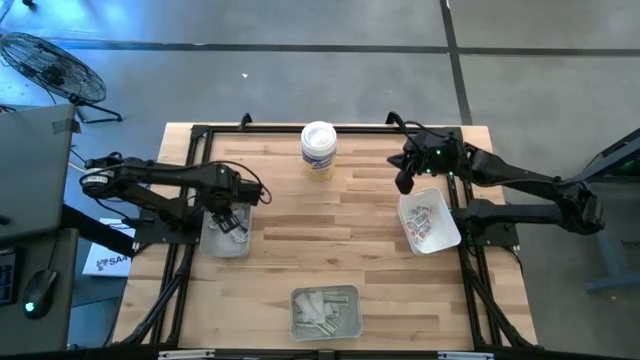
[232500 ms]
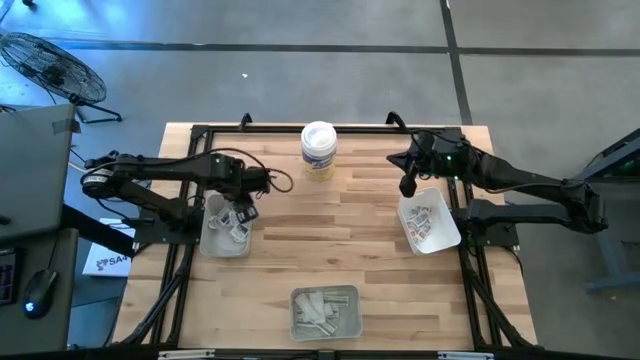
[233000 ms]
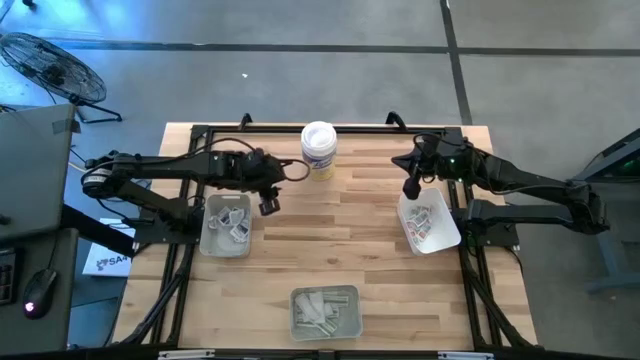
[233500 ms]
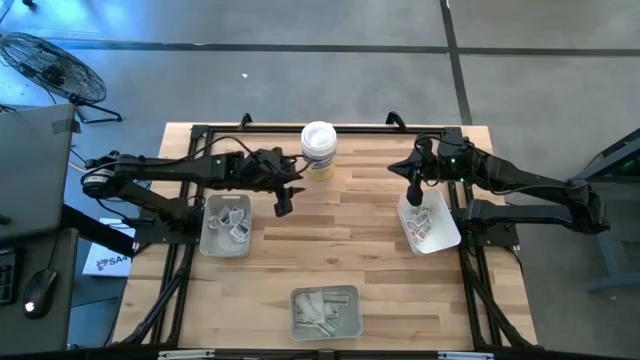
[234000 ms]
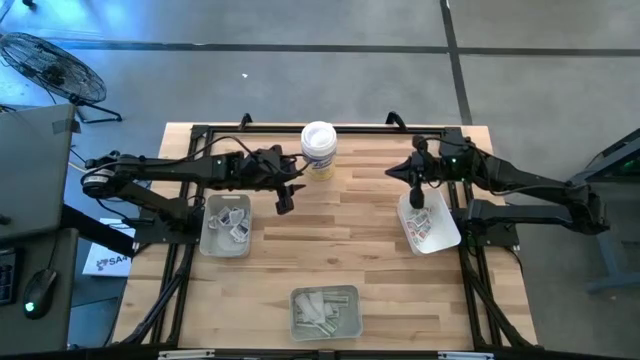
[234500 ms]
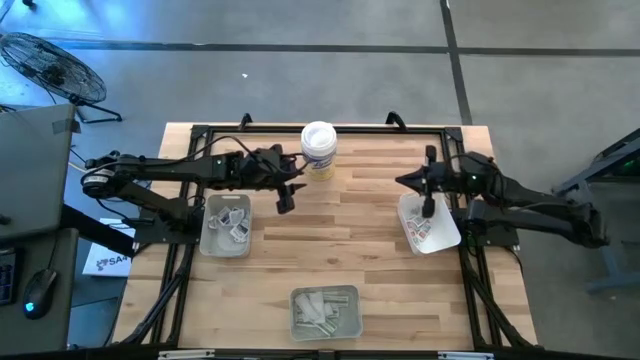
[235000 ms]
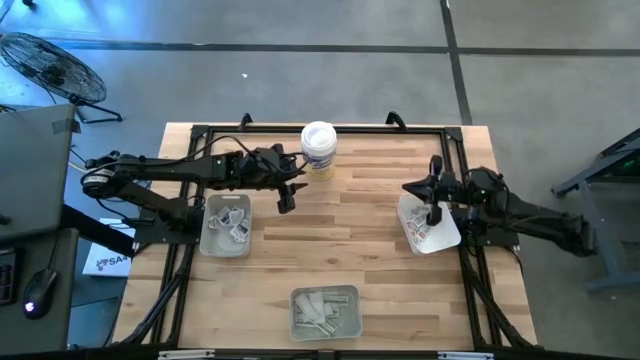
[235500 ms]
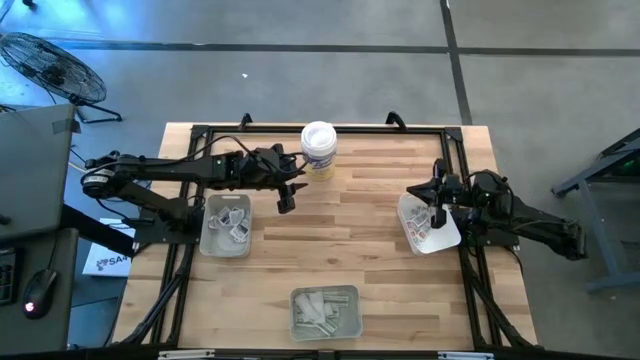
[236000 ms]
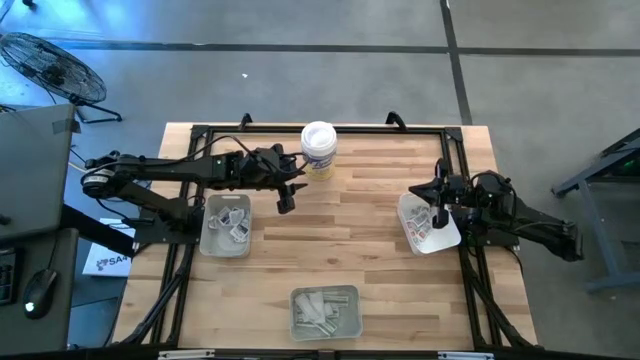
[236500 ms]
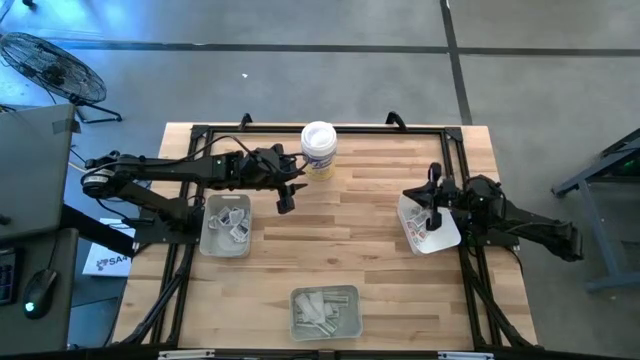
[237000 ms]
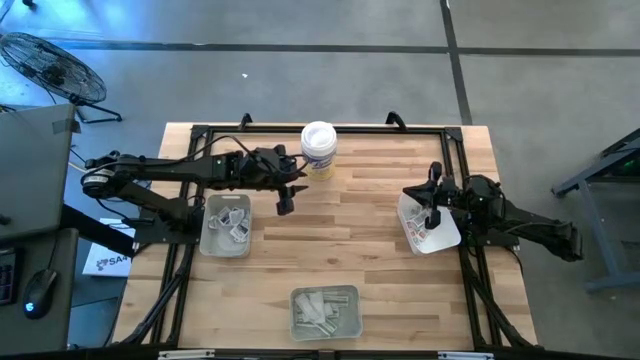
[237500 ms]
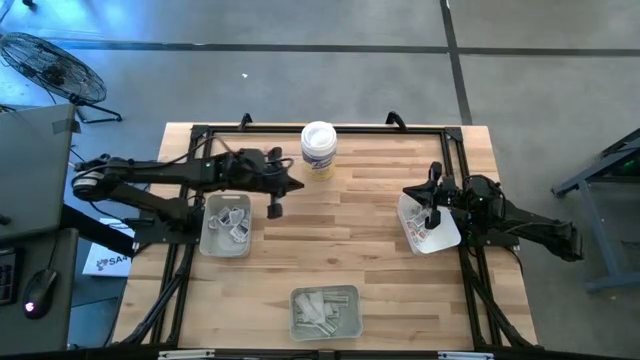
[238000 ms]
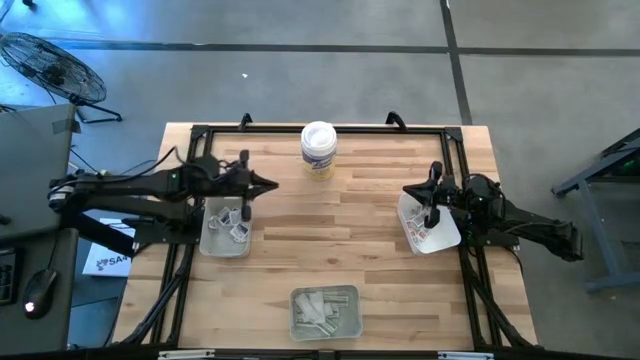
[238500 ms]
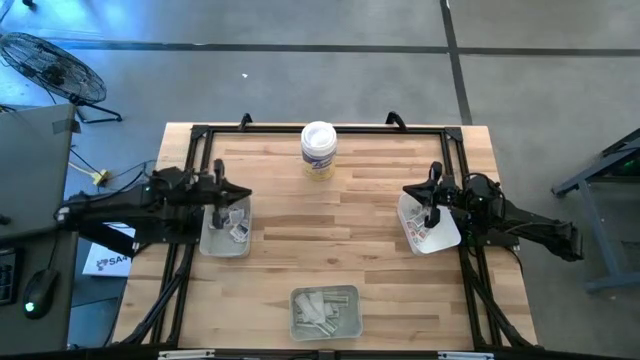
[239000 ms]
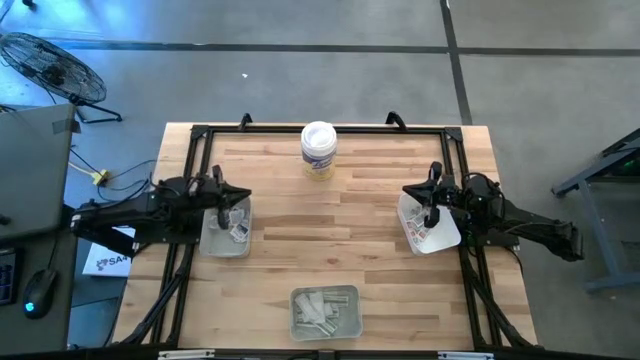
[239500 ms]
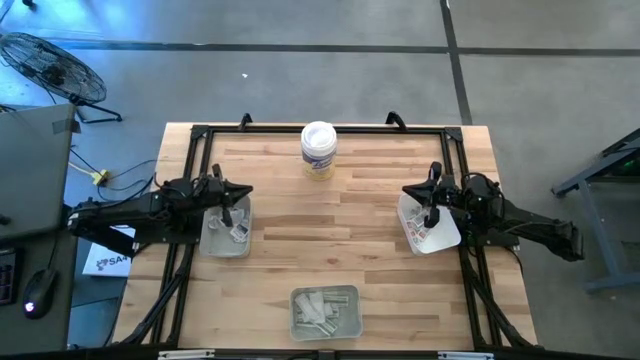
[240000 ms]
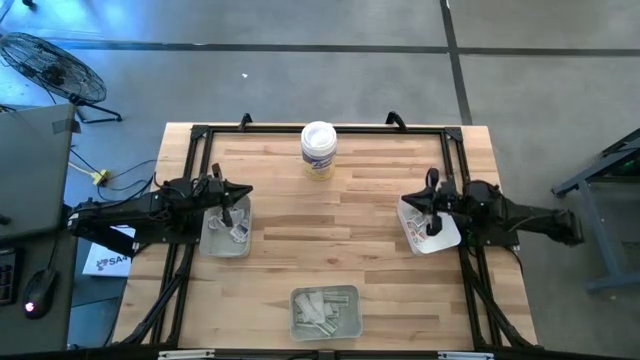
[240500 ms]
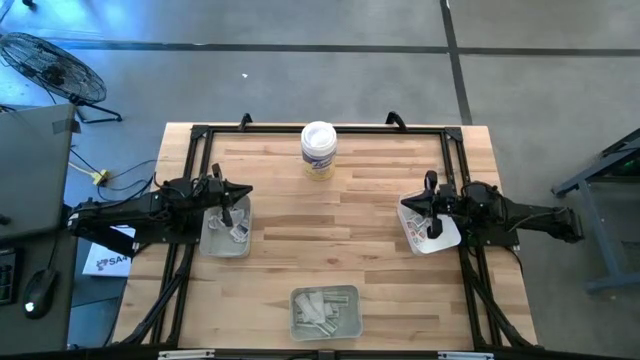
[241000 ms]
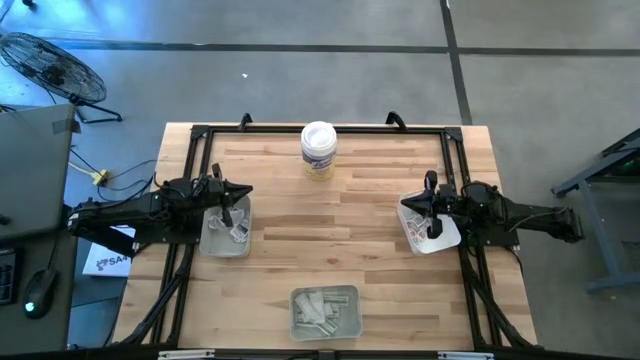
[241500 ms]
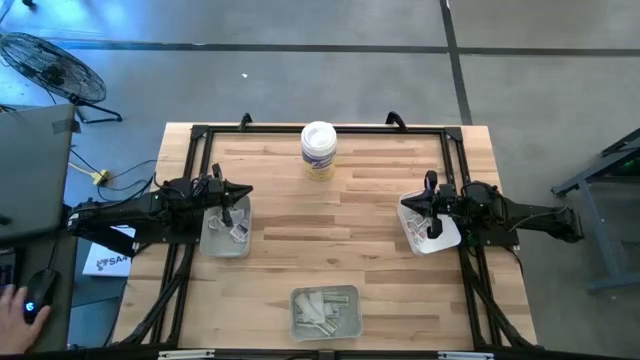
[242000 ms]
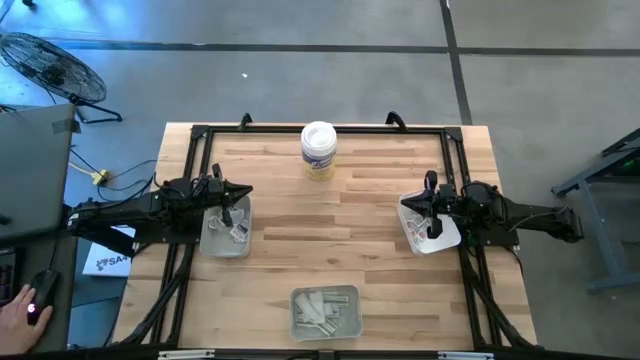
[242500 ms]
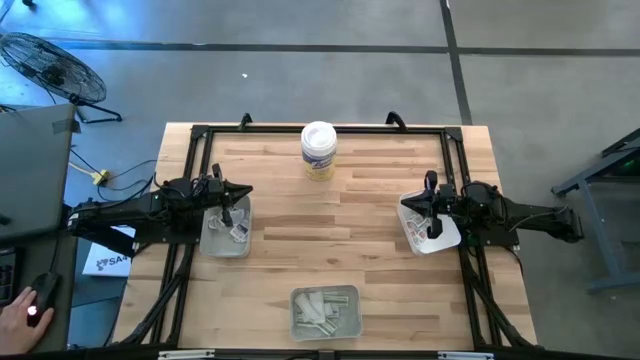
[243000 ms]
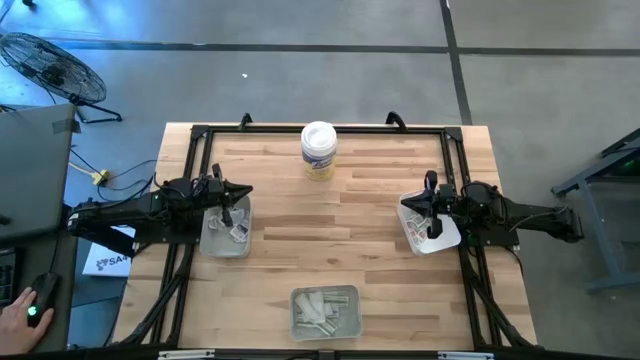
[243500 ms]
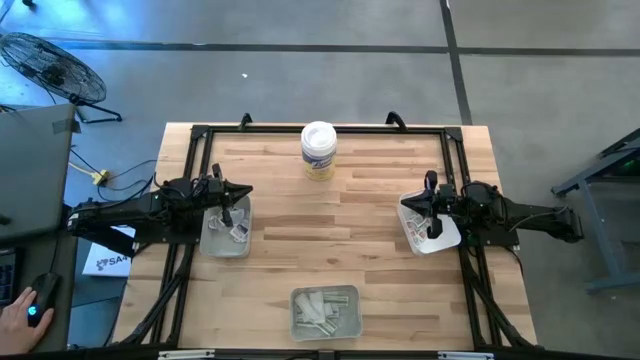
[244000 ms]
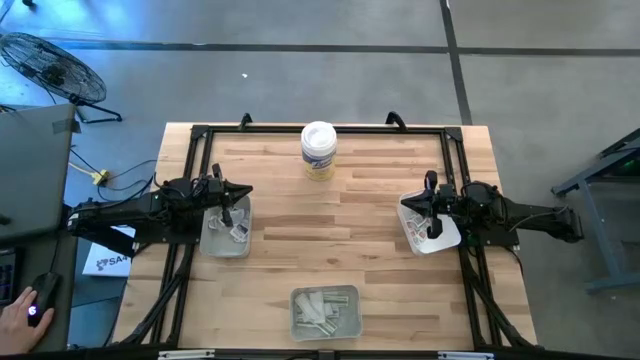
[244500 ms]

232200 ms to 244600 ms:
Task: Pick & Place First Aid Supplies
Return to Home Position

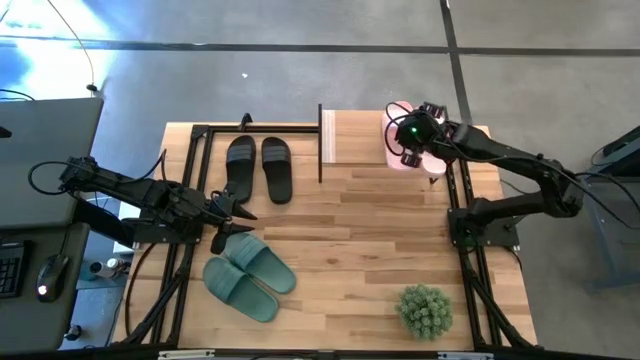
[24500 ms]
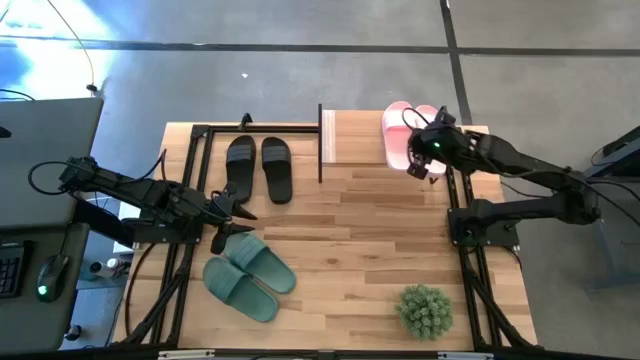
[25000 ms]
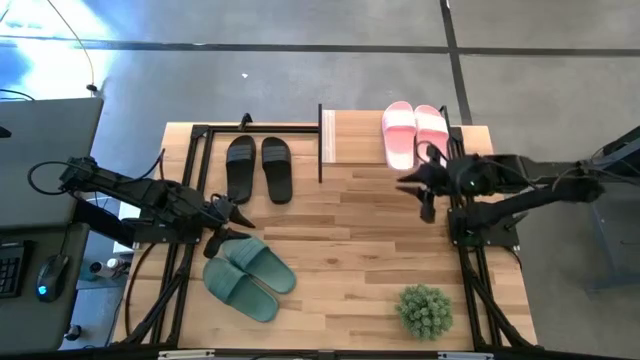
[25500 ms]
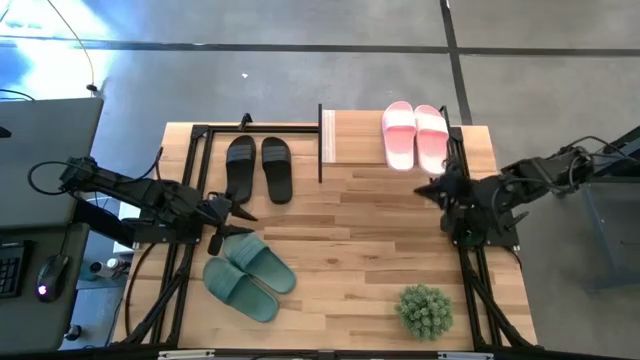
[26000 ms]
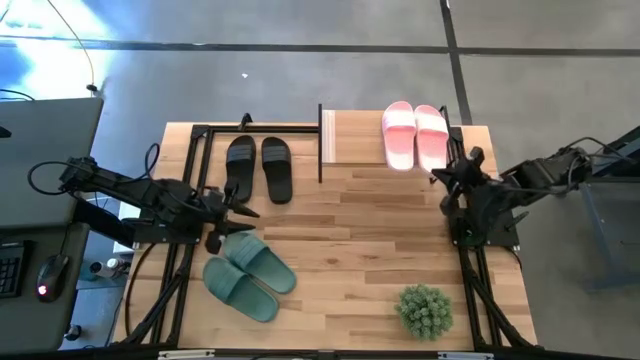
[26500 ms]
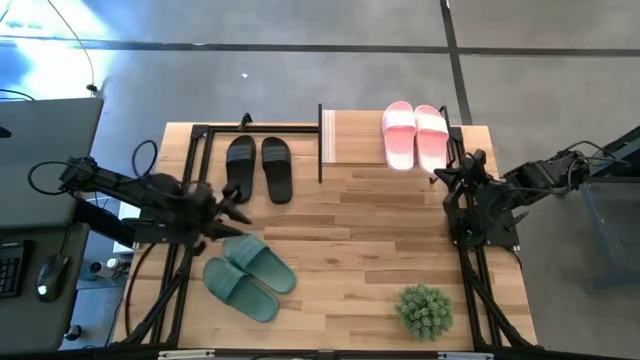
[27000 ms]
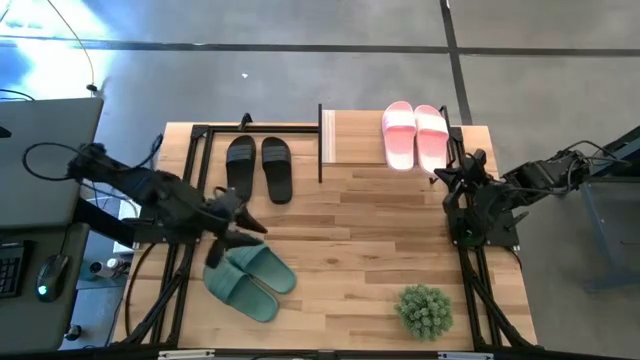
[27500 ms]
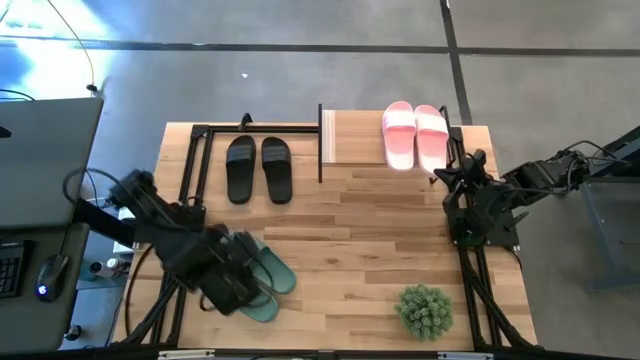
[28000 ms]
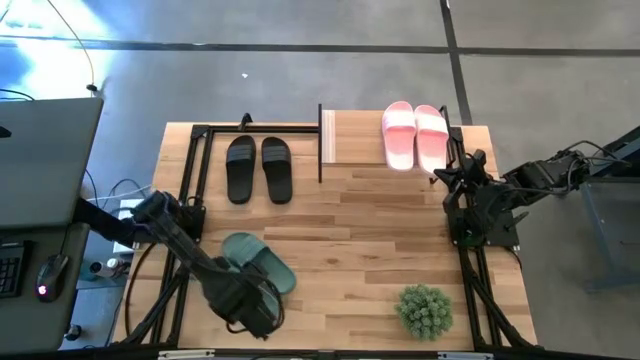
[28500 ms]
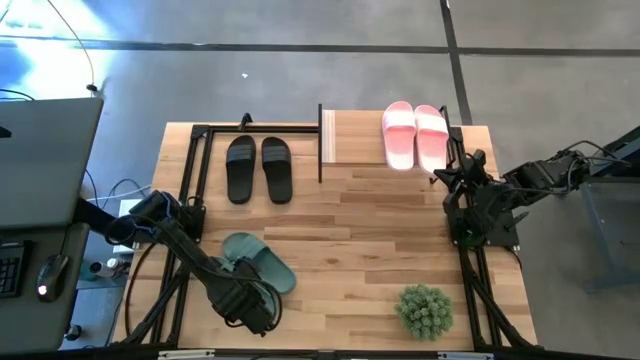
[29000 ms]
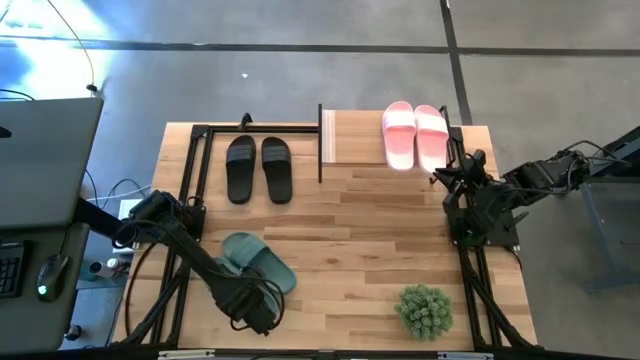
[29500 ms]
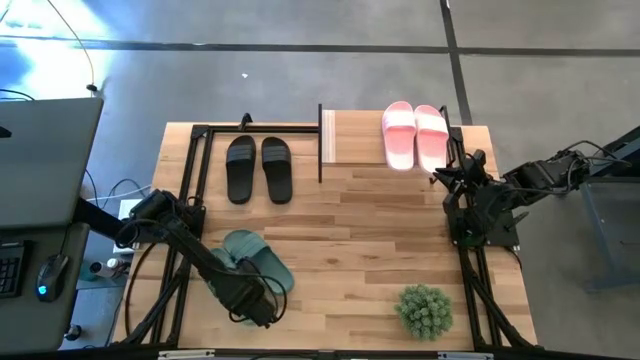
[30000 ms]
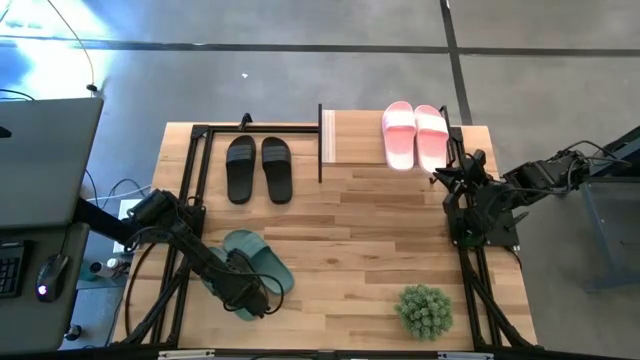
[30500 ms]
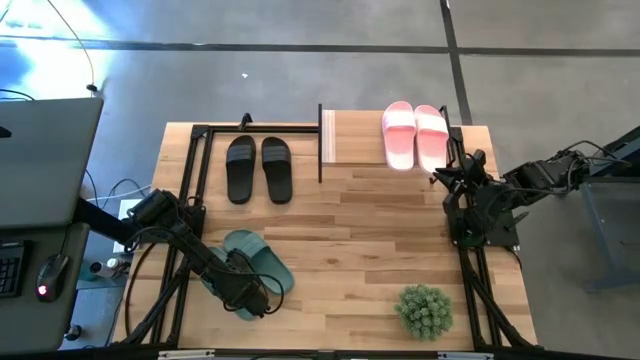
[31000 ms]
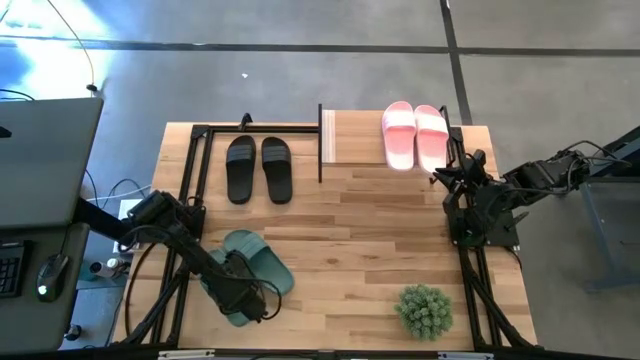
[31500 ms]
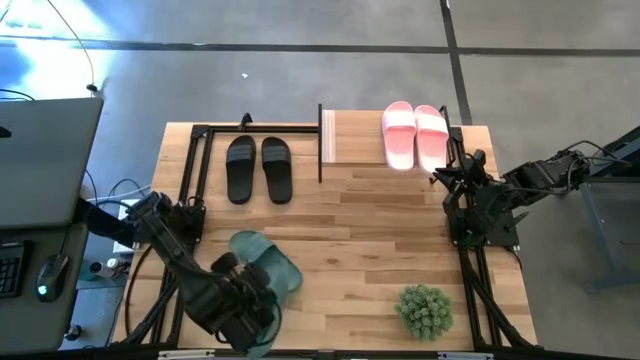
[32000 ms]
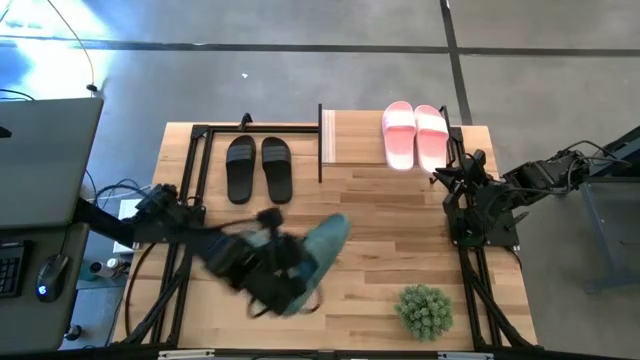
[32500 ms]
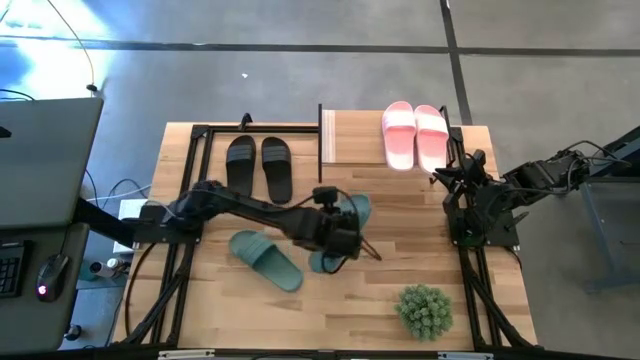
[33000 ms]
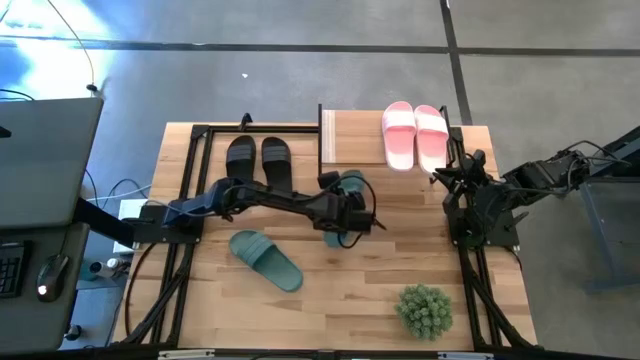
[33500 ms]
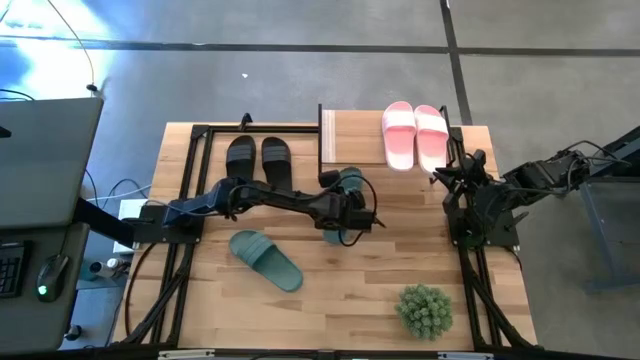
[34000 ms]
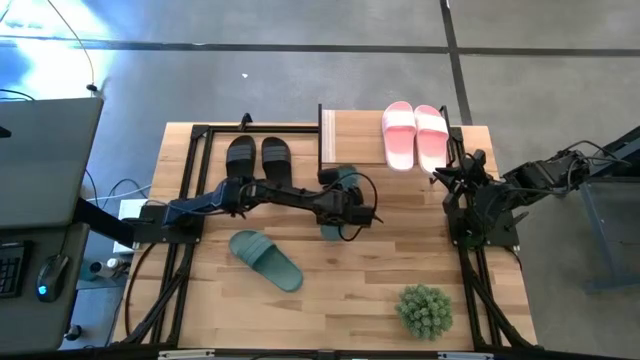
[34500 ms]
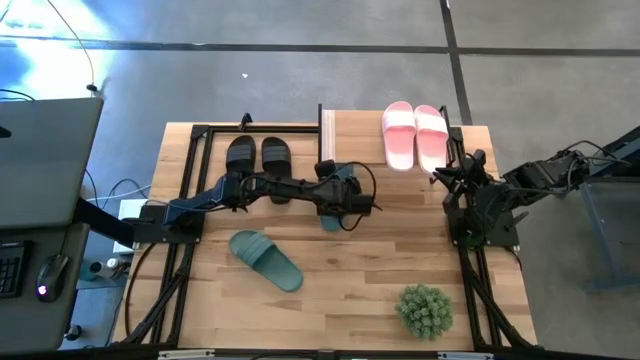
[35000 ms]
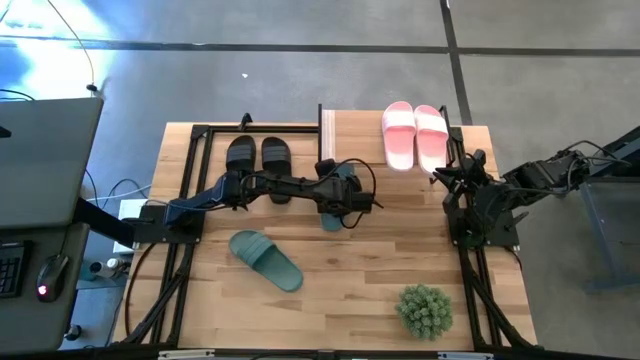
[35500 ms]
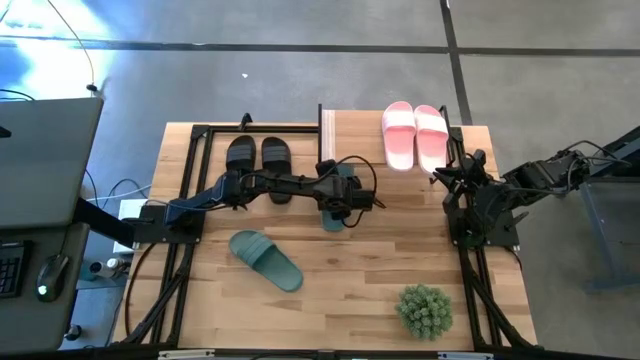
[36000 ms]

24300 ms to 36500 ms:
Task: Pick and place slides into the shelf
Put the bottom green slipper under the shelf
